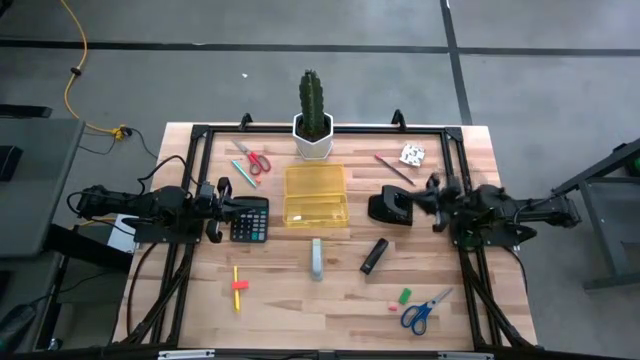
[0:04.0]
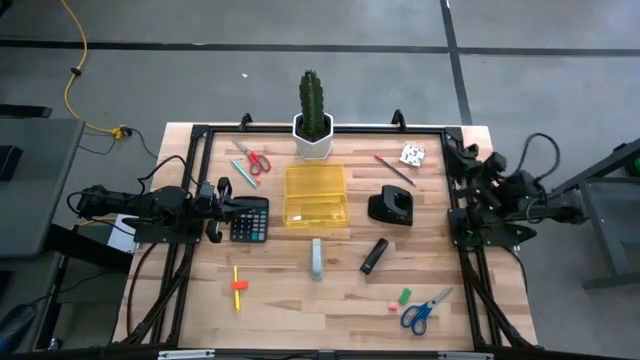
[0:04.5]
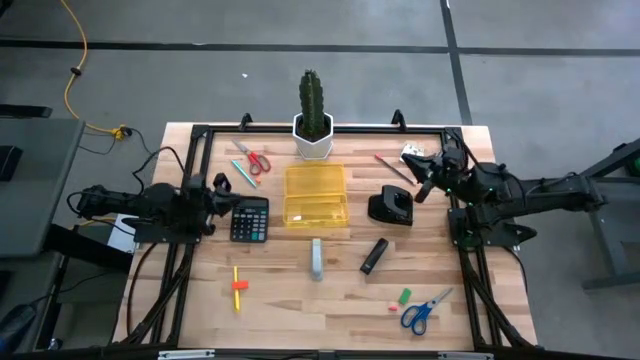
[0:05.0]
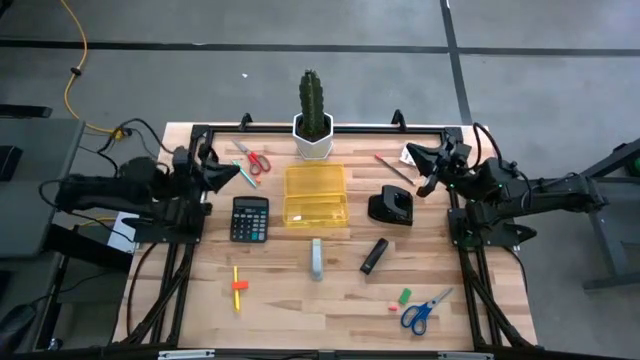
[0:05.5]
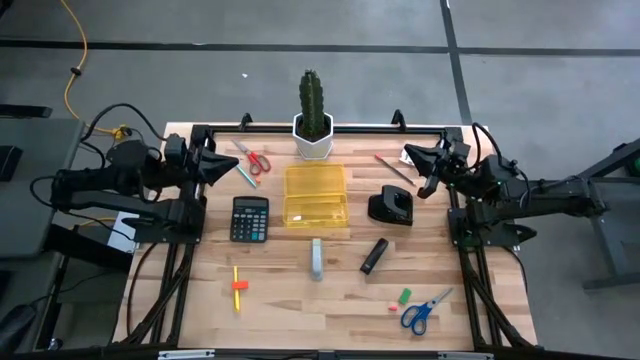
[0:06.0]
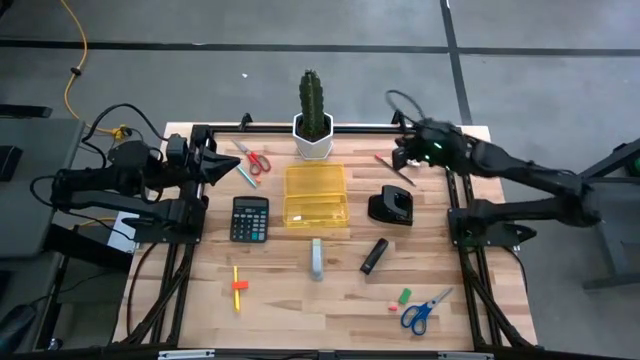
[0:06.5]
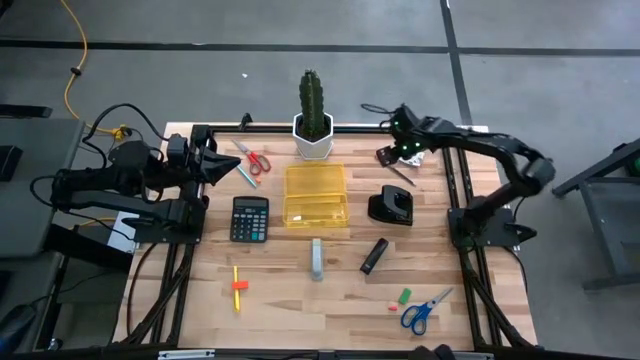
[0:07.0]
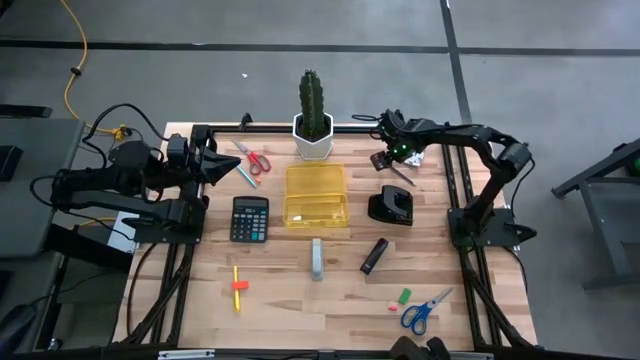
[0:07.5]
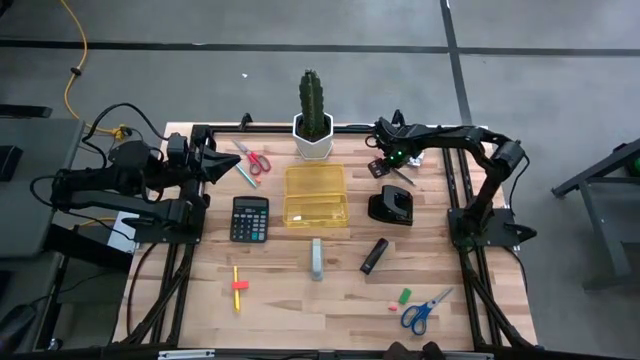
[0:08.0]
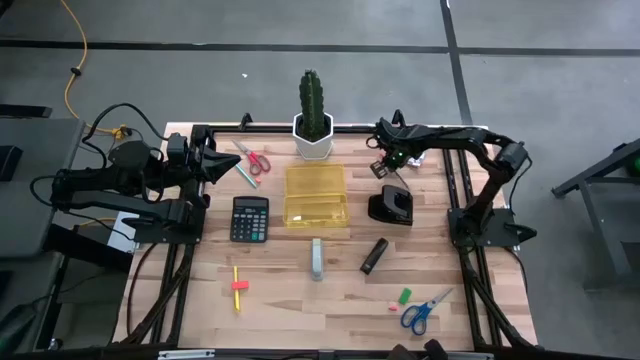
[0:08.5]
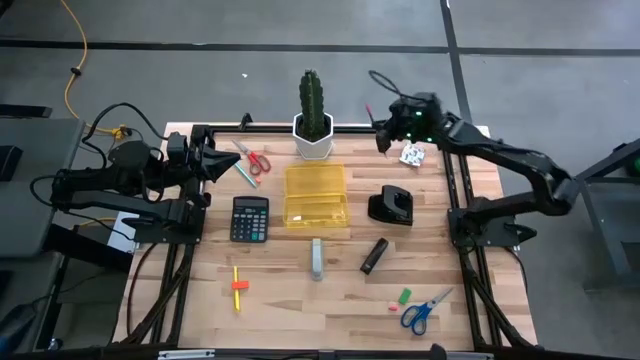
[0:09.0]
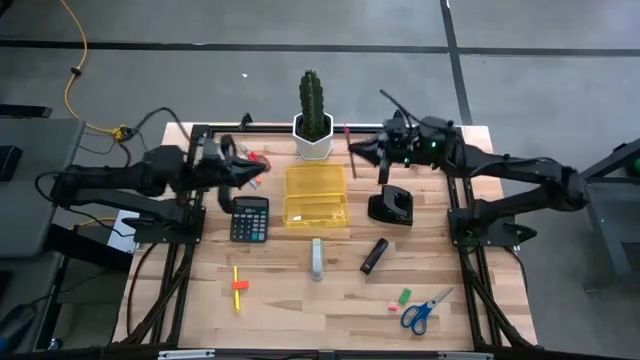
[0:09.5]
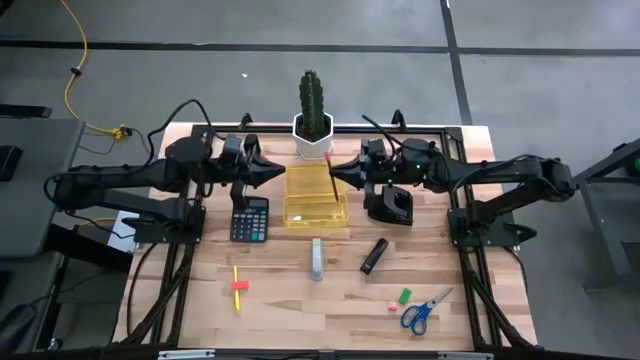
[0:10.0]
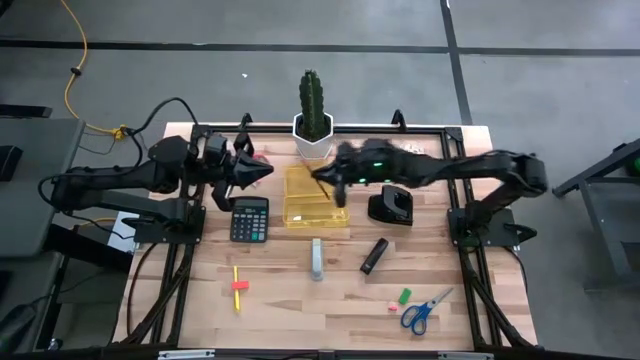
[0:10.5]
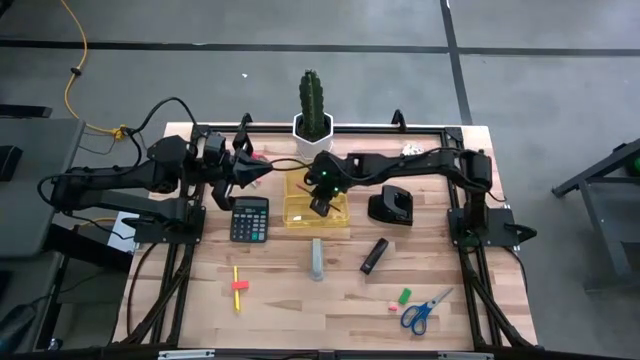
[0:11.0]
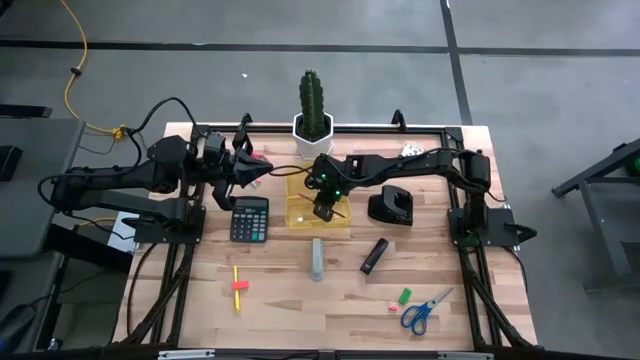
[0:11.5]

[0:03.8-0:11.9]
Task: Pick & place school supplies into a supply box
Put the black pencil into the yellow supply box

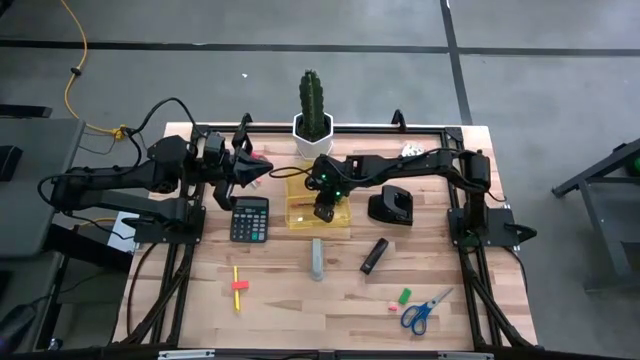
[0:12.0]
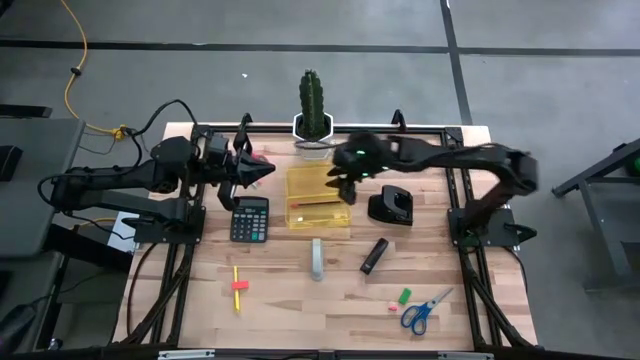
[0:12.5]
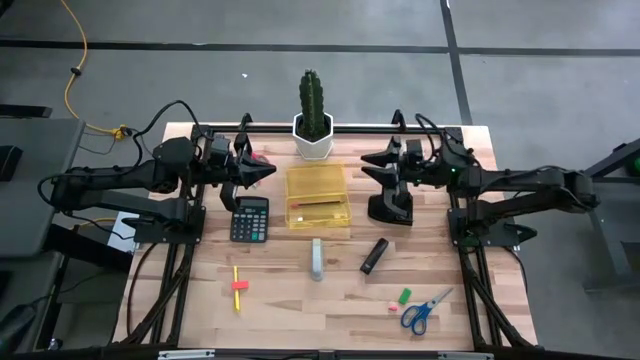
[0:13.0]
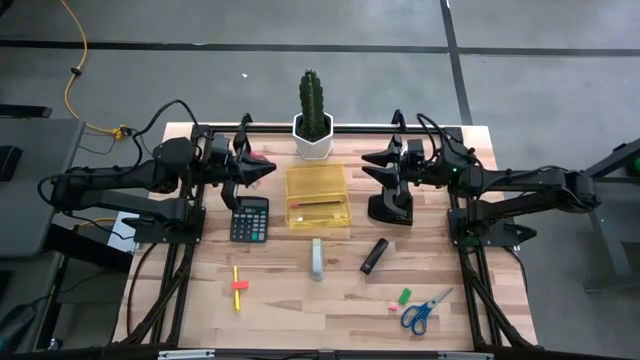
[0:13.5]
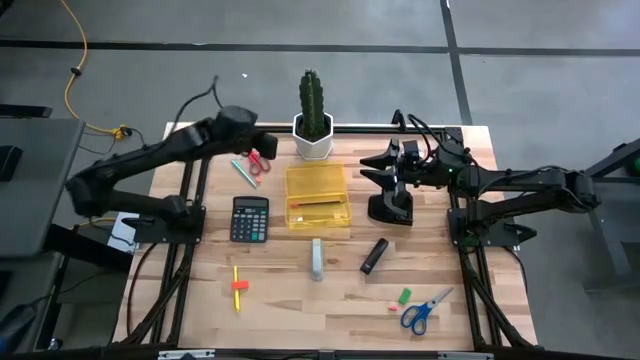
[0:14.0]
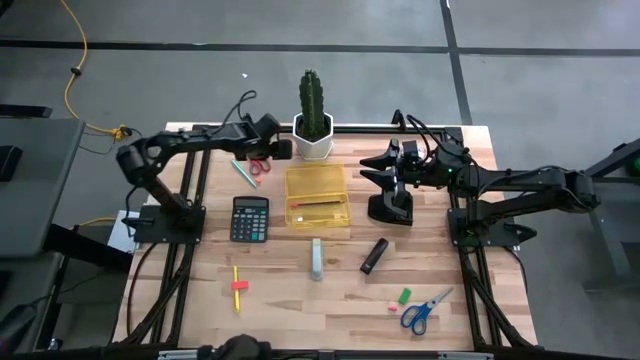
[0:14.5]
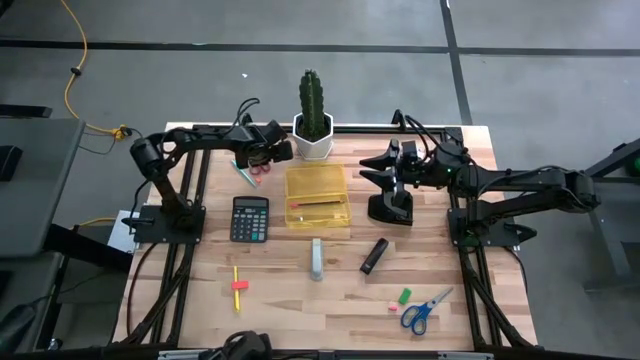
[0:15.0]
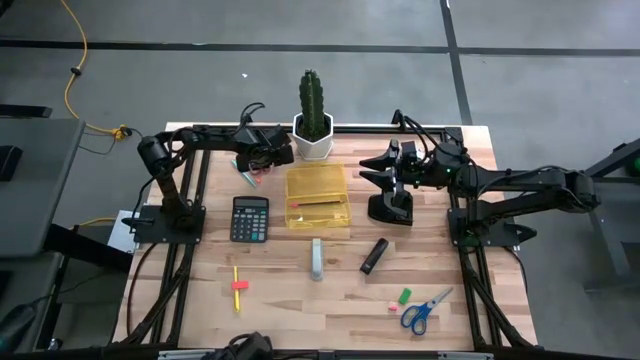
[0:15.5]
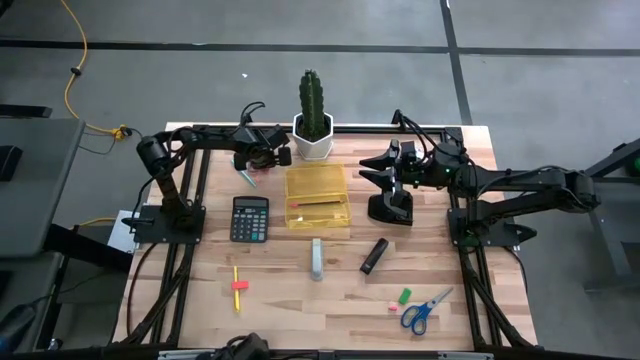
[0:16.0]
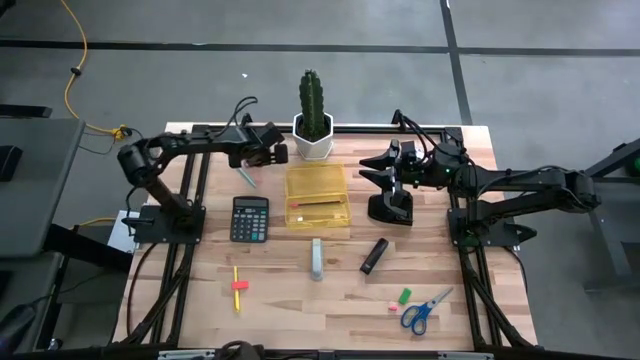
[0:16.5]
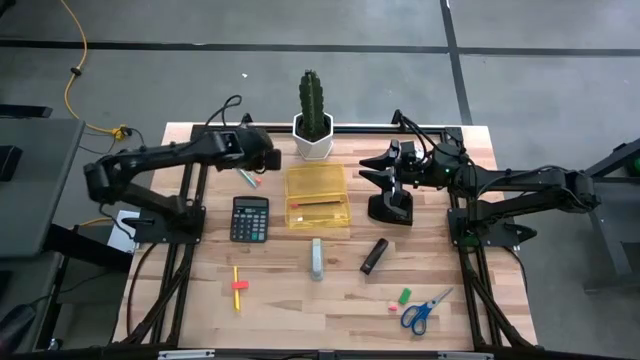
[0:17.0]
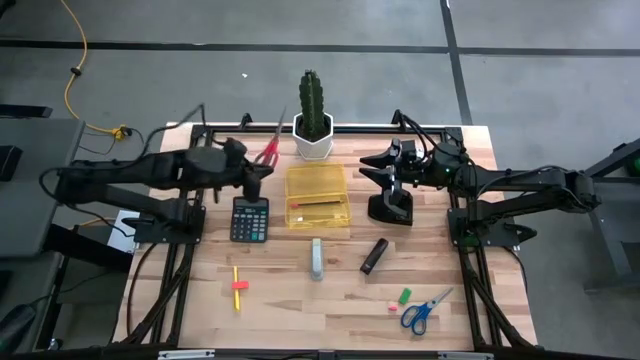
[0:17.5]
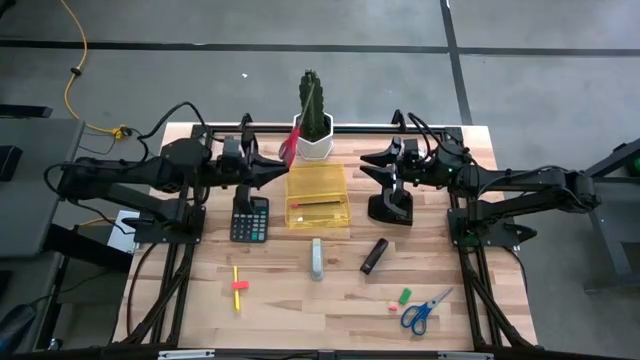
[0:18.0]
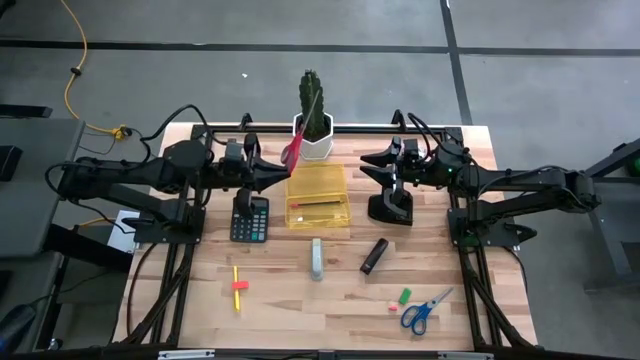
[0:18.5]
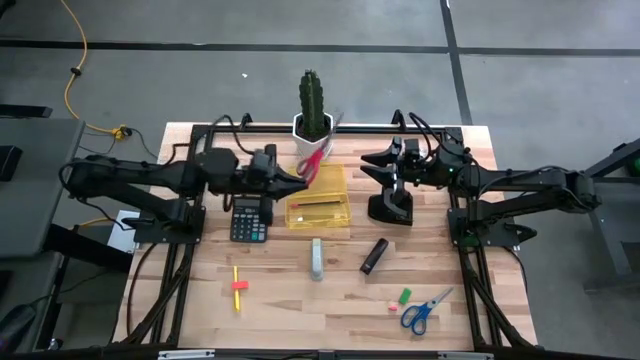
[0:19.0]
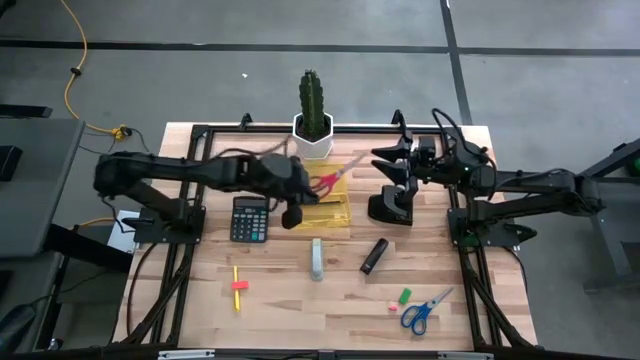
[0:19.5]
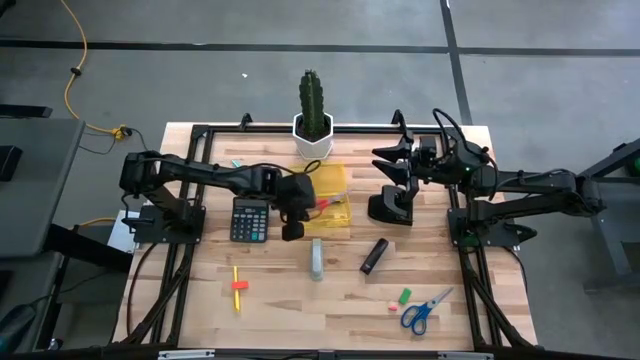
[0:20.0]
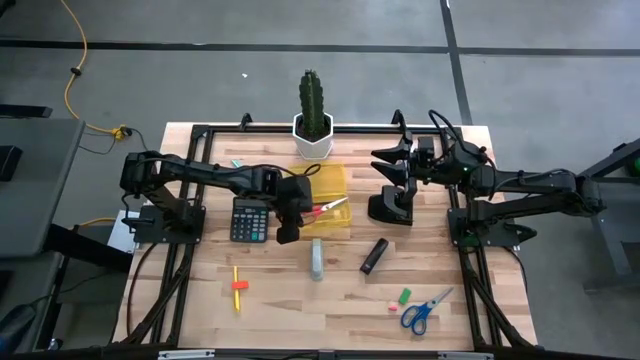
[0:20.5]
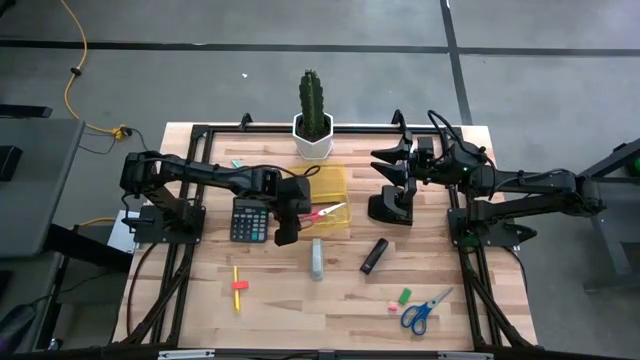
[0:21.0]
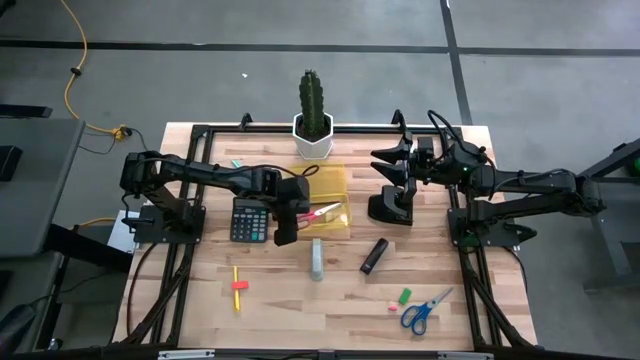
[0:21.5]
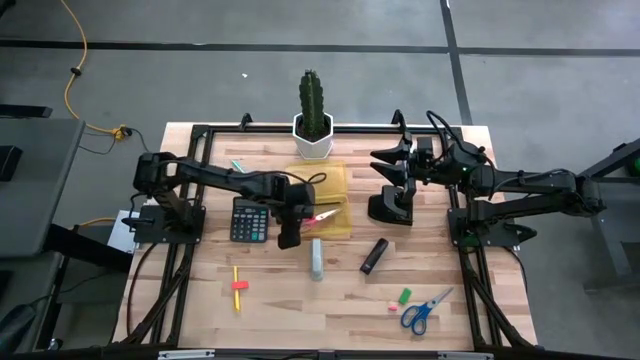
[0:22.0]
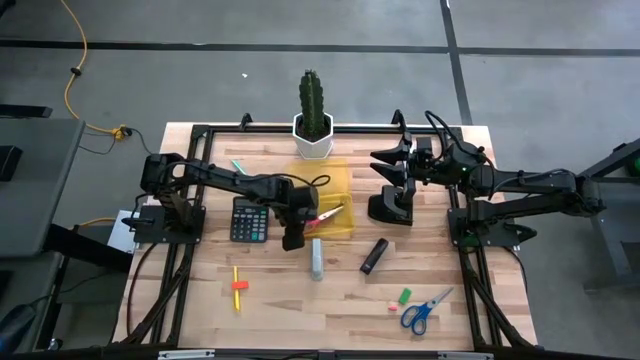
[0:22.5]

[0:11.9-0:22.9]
Put the red scissors into the yellow supply box

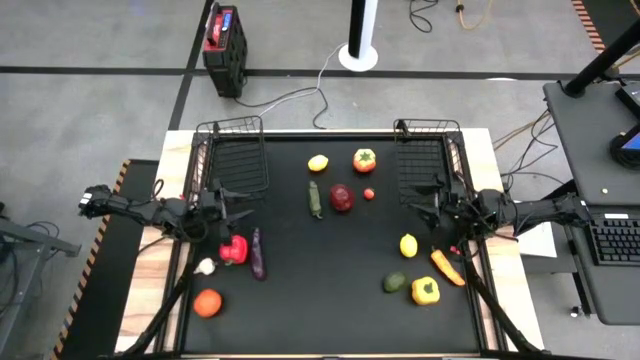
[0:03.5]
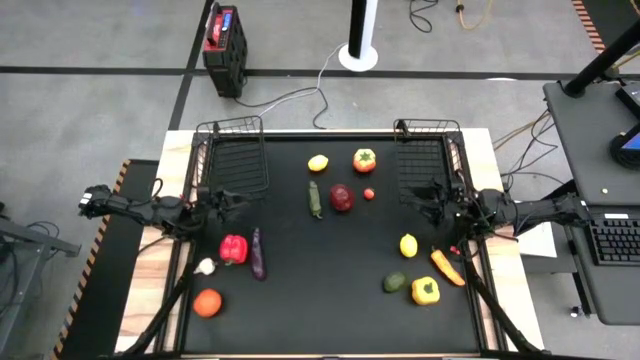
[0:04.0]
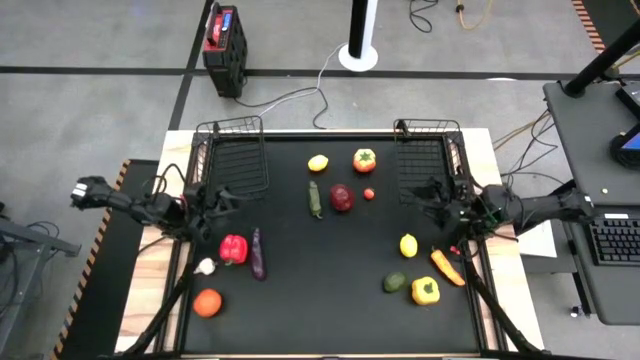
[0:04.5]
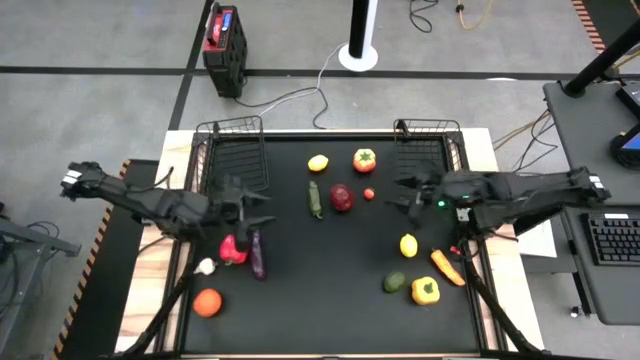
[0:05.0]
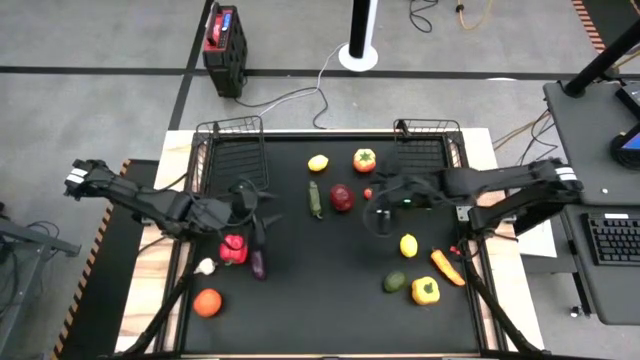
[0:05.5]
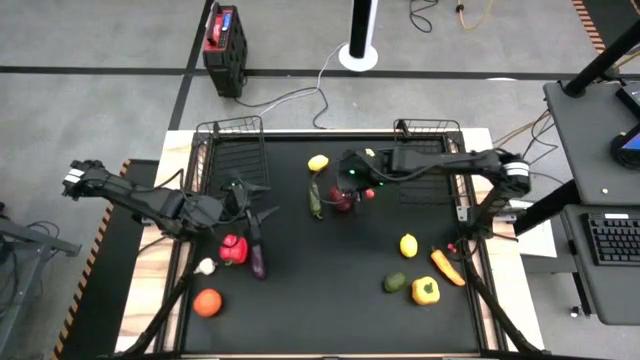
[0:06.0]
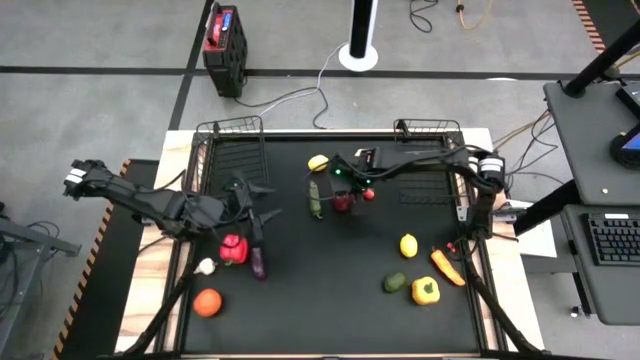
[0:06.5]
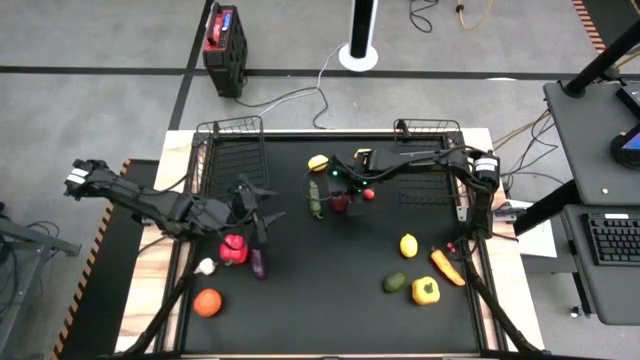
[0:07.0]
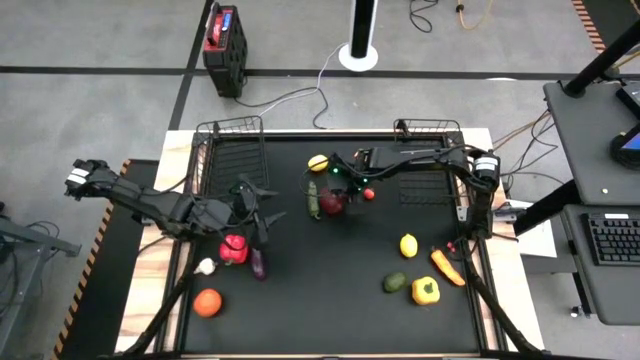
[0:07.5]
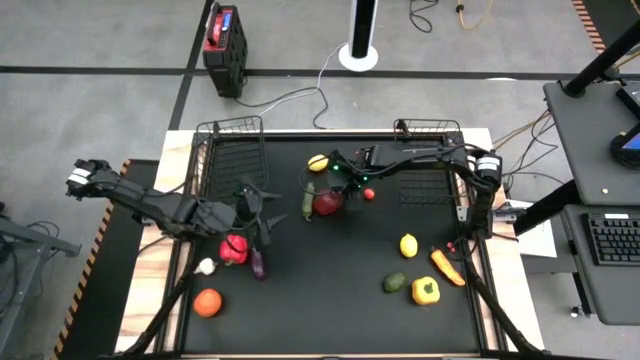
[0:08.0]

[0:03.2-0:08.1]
Task: Sort produce into baskets
Put the red apple into the right wire basket
